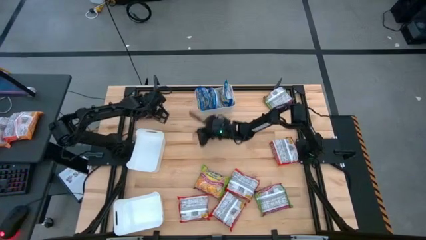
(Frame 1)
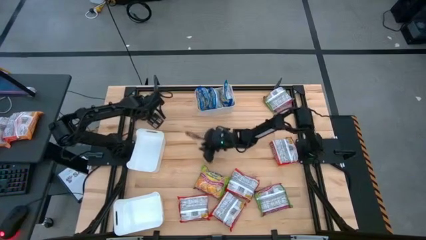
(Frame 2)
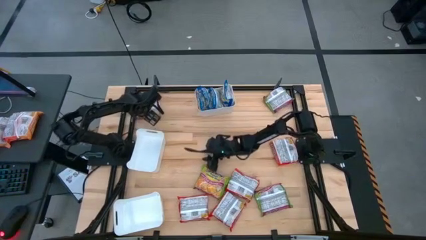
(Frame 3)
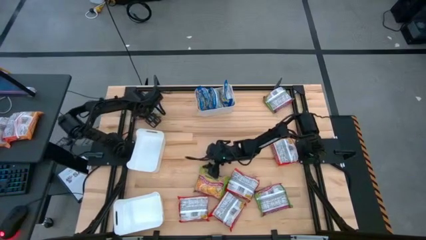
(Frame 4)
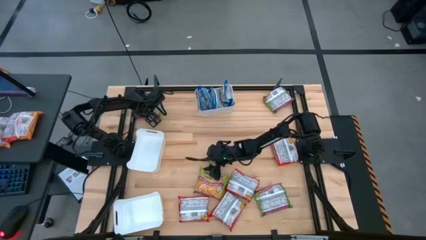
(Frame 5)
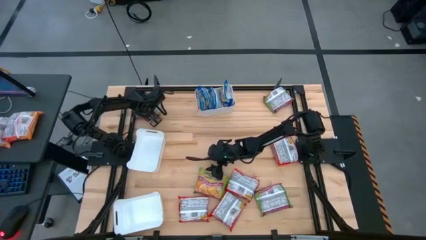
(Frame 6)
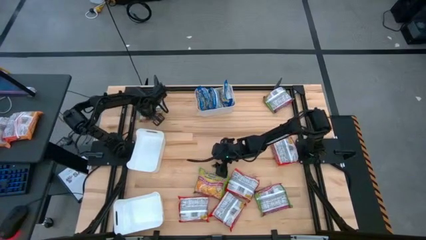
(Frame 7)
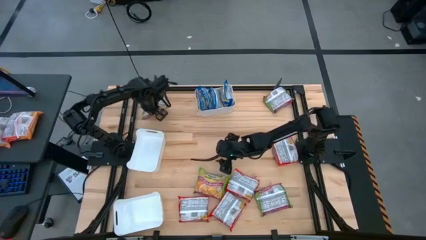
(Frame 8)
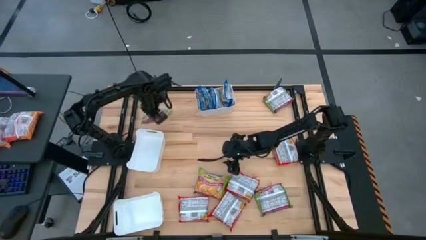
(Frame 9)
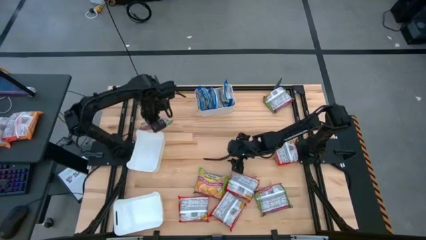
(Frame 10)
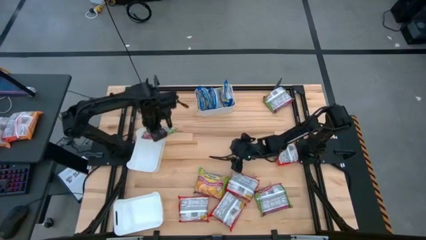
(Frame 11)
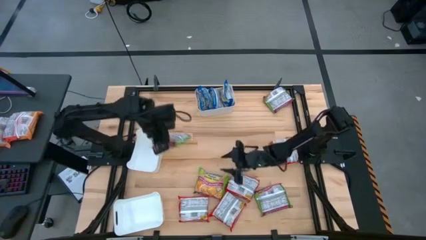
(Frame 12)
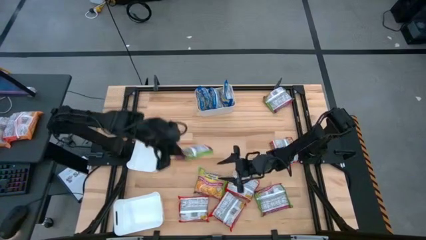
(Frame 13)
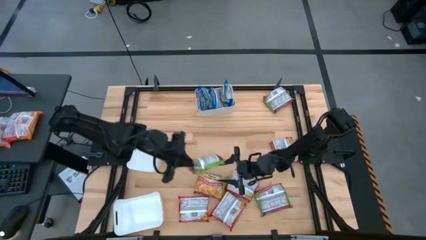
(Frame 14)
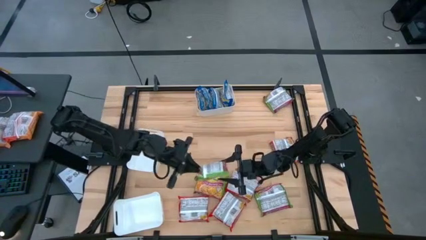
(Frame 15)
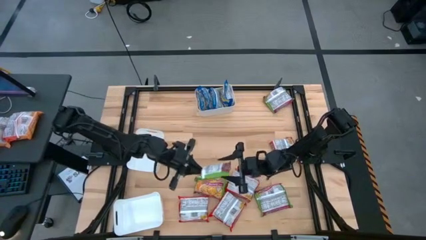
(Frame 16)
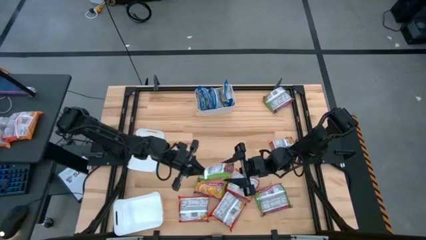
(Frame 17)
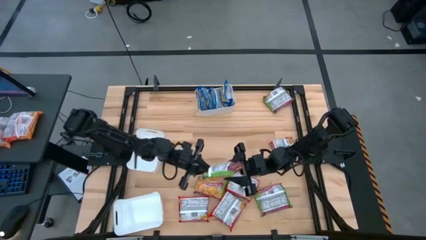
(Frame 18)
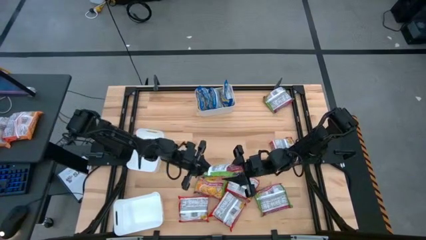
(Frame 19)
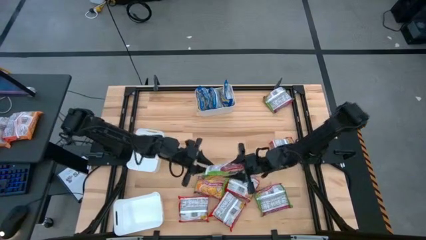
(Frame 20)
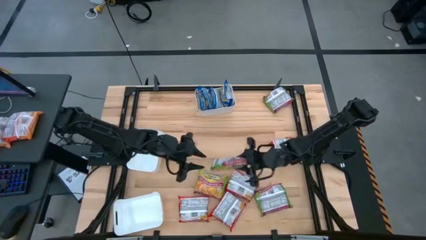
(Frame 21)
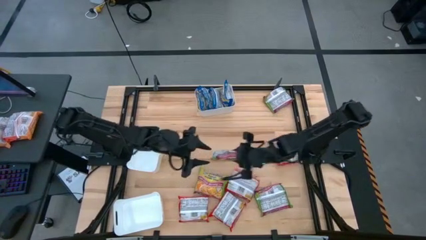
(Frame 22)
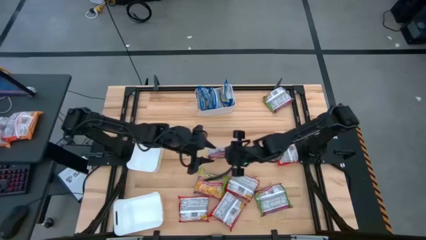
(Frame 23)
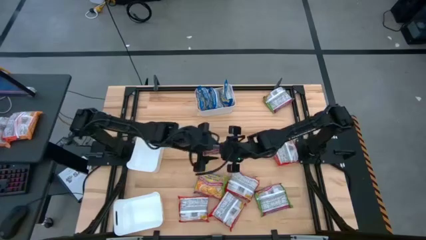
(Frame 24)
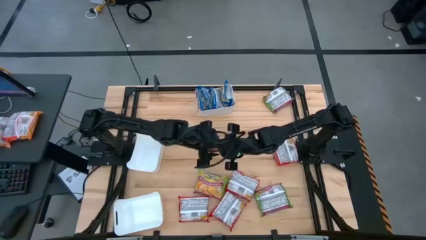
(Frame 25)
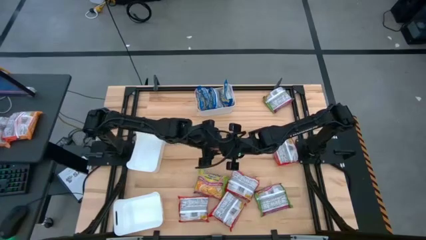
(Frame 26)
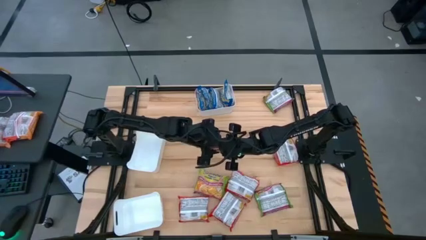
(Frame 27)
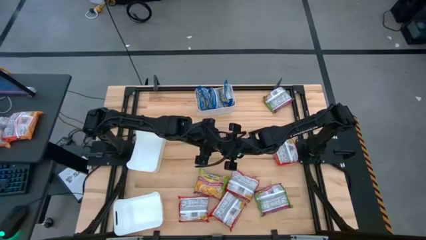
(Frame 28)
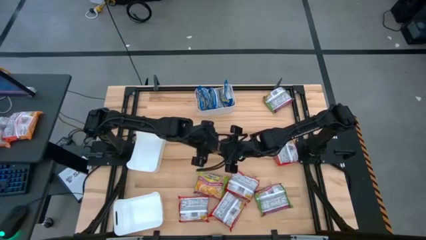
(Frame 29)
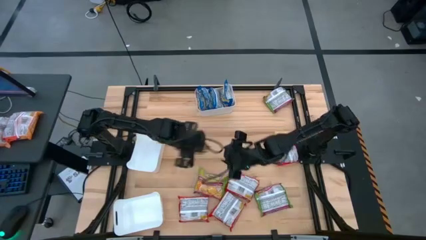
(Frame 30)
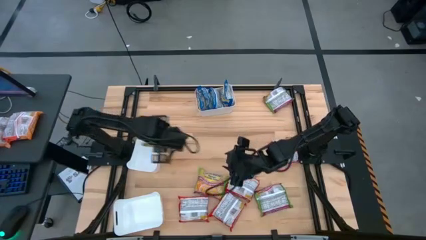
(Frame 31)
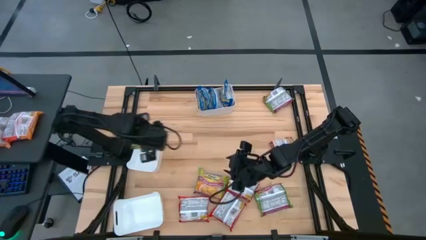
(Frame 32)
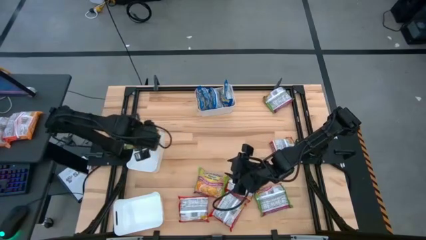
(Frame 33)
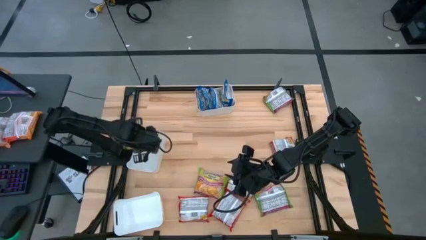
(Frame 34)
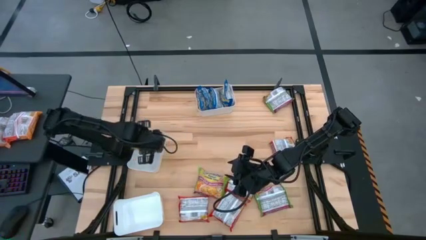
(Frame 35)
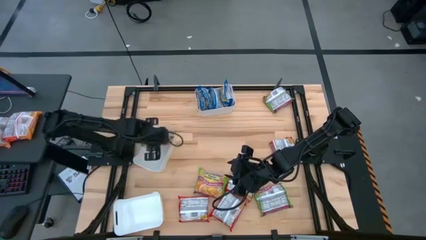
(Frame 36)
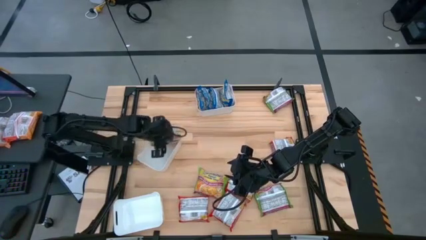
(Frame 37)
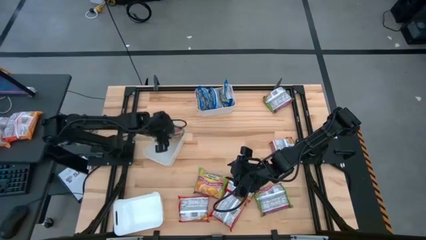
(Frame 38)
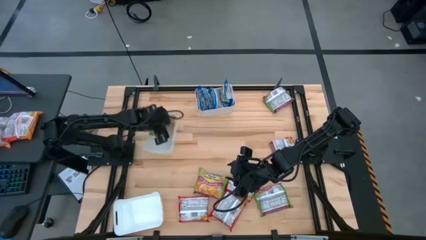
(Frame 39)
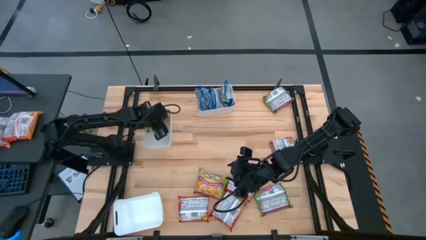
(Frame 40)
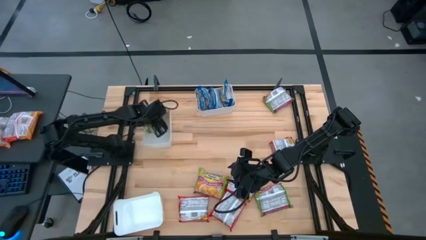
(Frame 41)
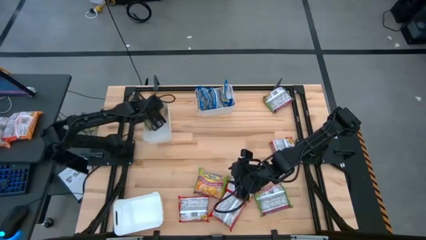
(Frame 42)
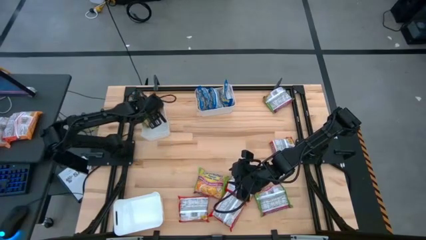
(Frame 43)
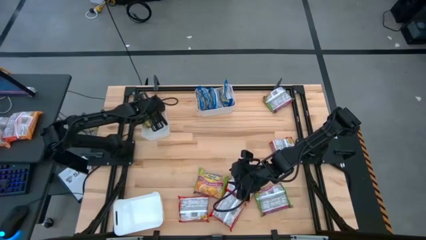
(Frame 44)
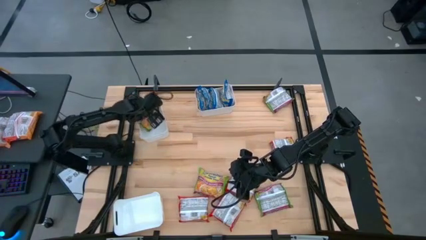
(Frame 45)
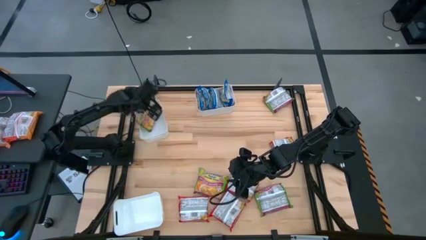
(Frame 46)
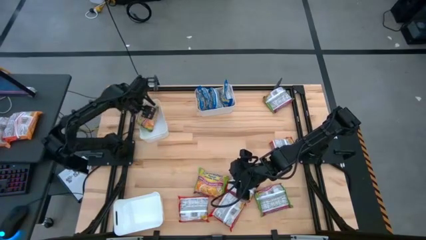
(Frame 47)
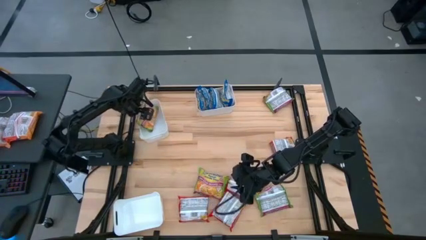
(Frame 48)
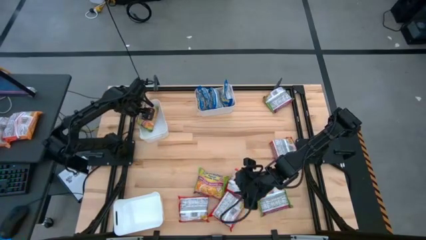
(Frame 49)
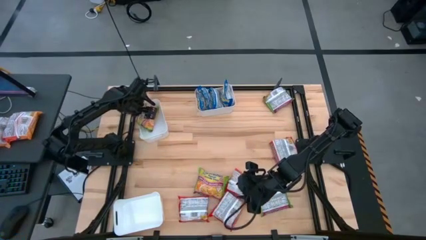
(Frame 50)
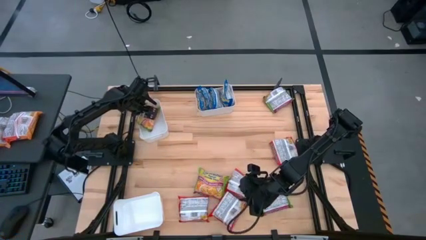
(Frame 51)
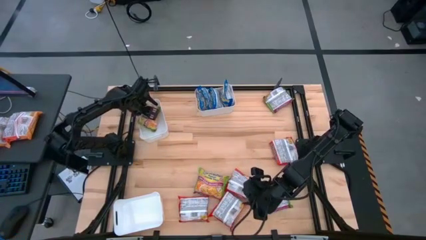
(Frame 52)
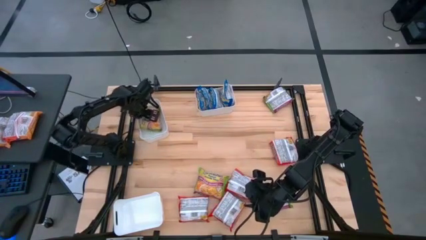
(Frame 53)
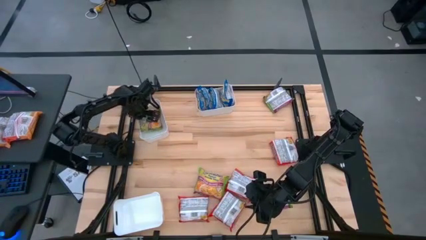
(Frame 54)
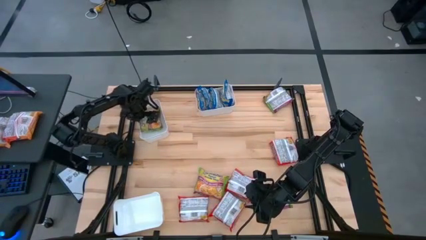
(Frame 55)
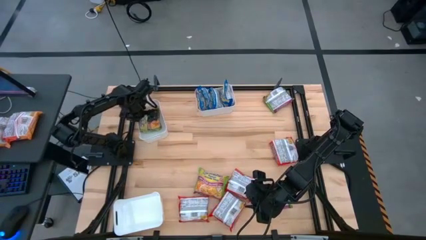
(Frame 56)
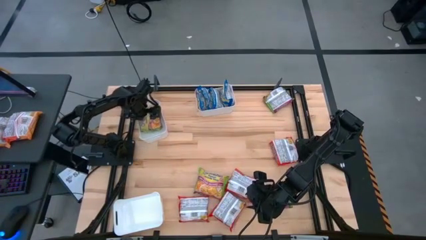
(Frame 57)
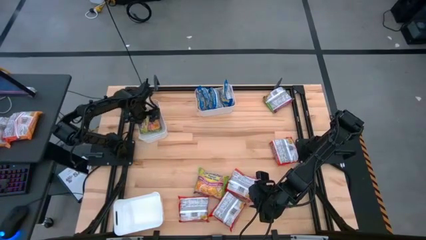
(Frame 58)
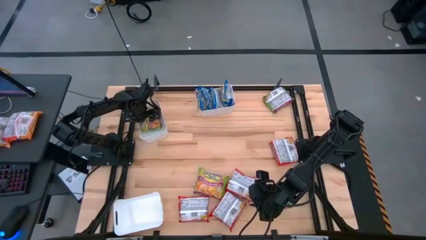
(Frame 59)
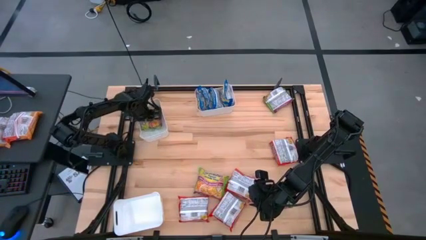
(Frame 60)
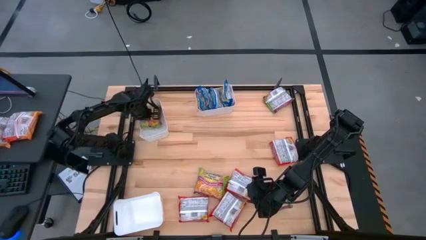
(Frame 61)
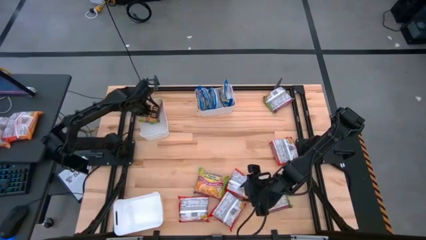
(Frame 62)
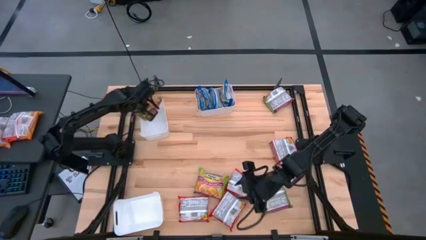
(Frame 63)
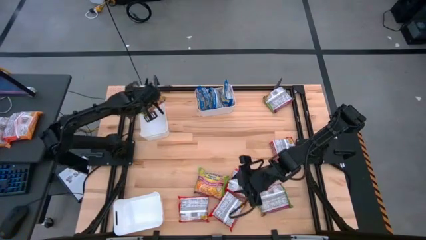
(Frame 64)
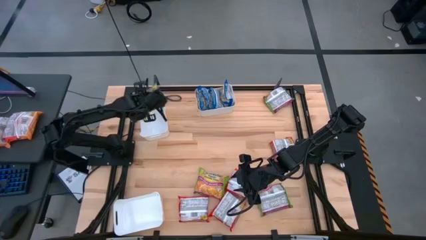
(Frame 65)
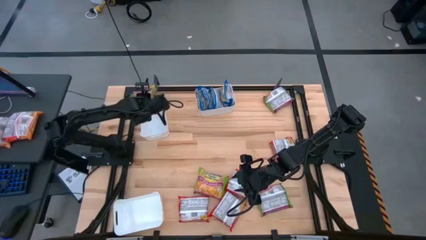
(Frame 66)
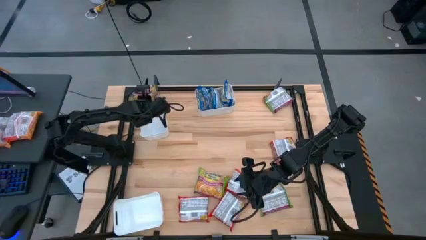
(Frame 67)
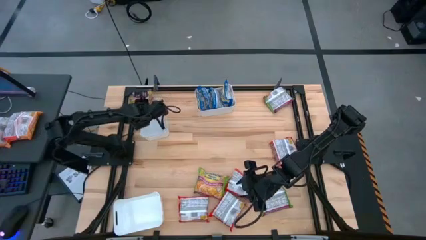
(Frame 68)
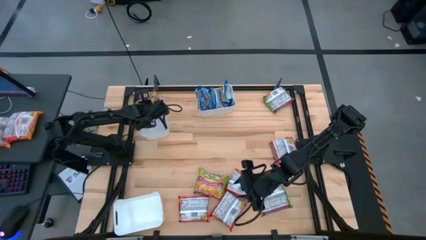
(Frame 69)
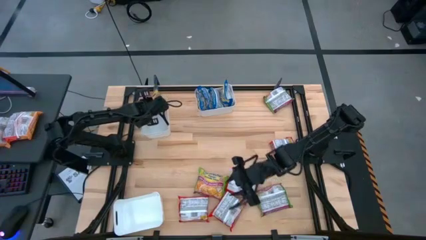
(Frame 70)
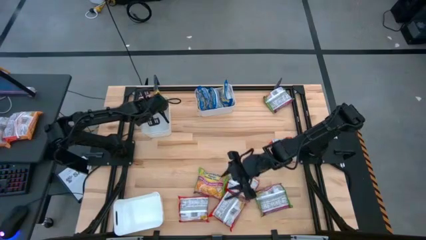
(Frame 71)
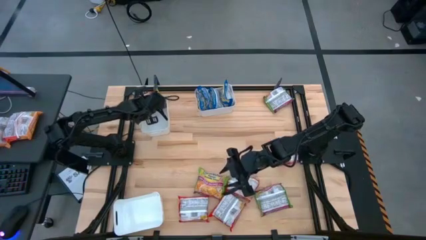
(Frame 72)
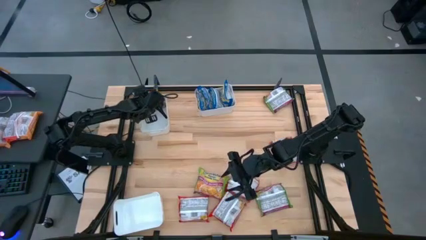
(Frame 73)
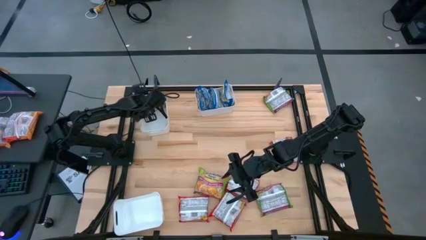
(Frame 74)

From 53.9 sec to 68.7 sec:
Task: Sort Maruchan noodles
Put the green noodle pack into the middle white bin

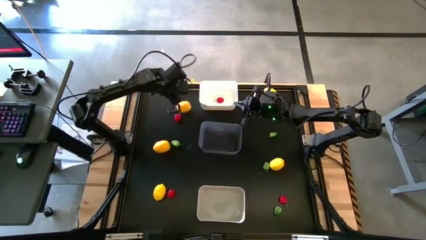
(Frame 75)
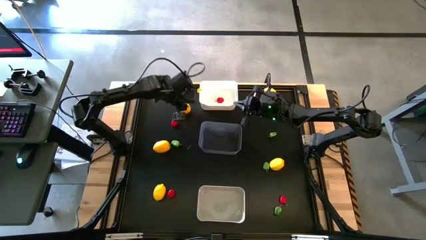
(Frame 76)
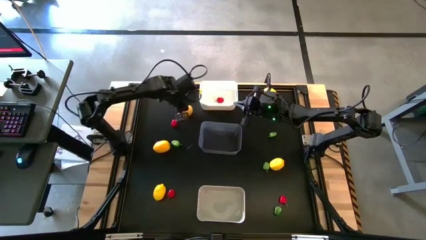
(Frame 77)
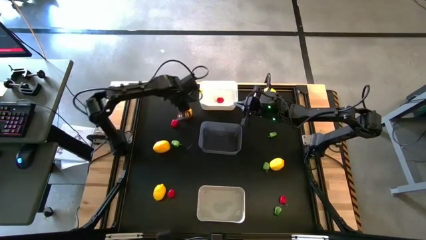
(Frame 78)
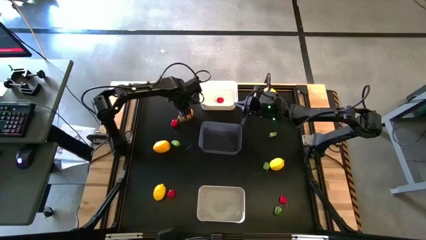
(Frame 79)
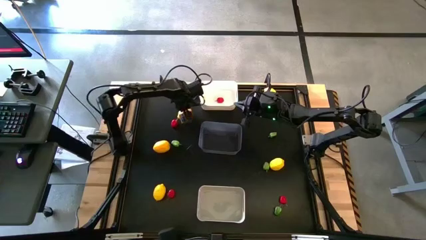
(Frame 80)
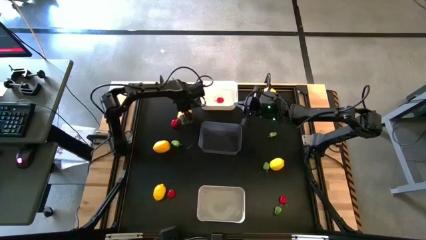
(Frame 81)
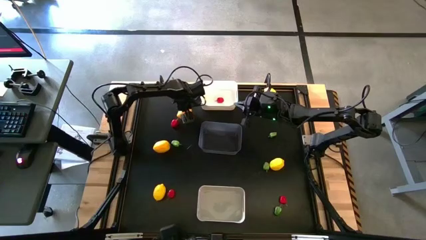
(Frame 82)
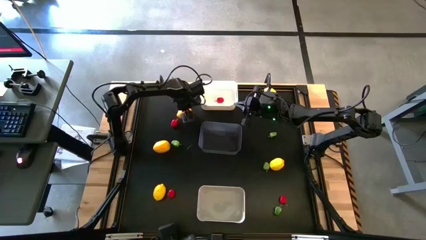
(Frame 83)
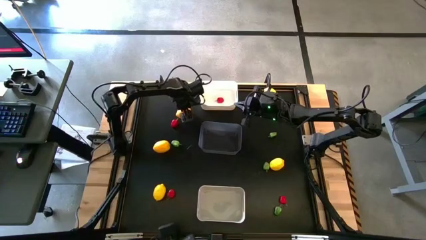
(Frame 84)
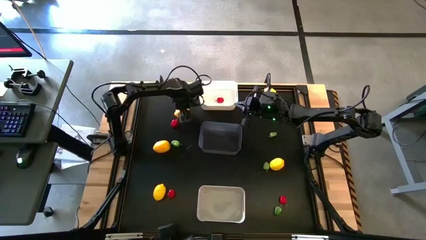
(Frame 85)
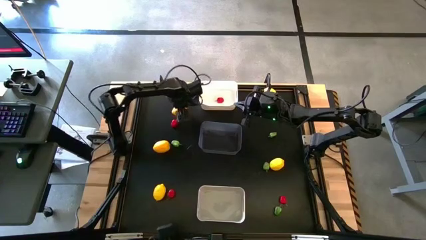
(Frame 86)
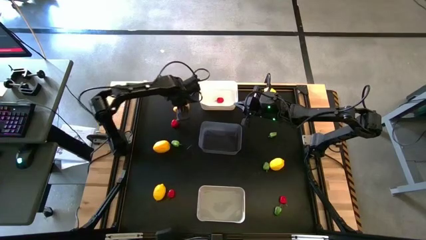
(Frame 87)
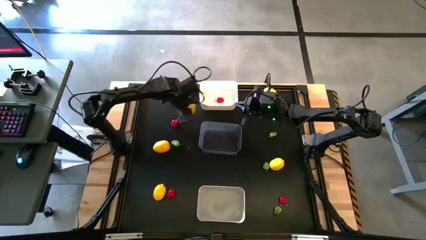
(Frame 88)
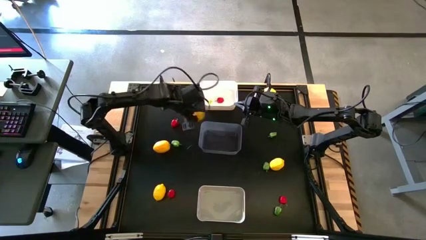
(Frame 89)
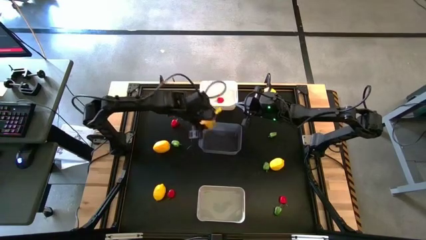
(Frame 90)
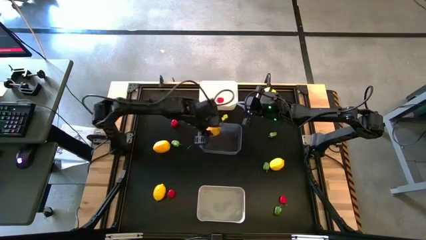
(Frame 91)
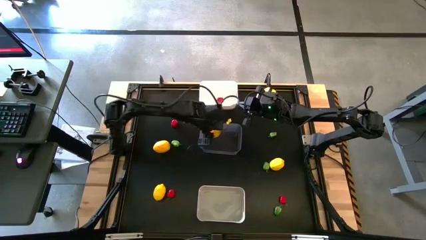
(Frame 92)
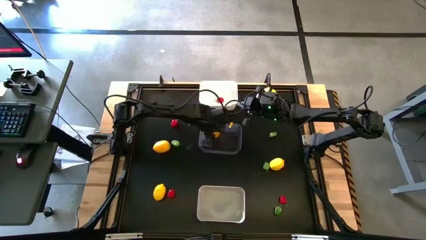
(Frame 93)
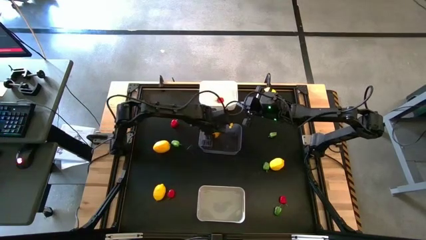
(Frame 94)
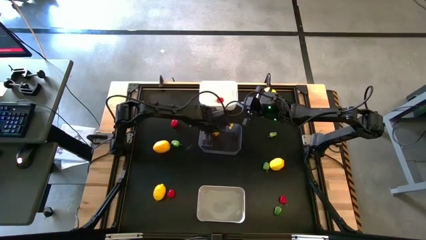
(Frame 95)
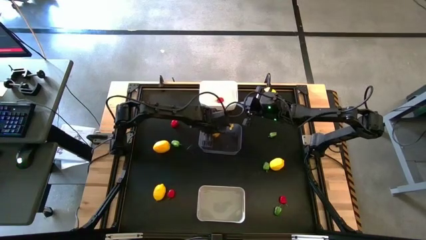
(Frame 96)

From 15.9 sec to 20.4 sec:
Task: Sort produce into baskets
Put the yellow lemon into the transparent bin
